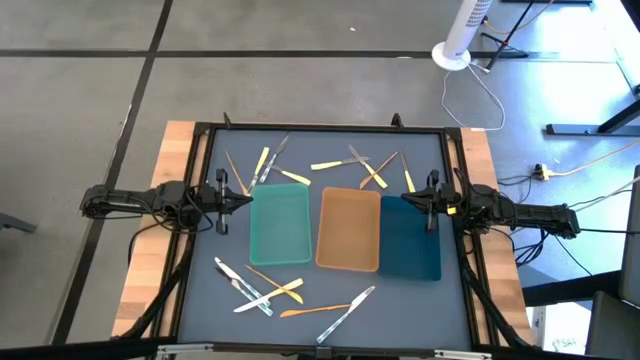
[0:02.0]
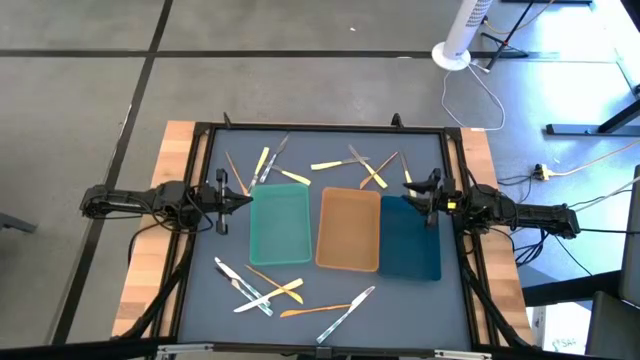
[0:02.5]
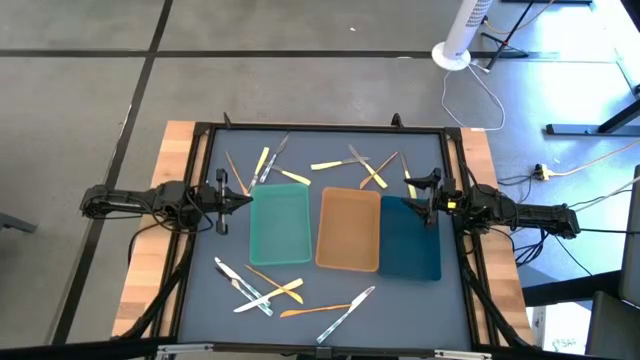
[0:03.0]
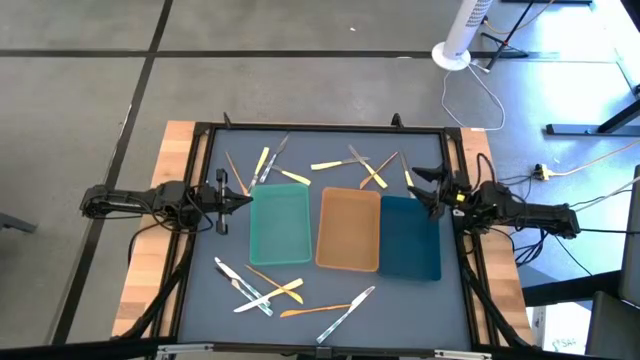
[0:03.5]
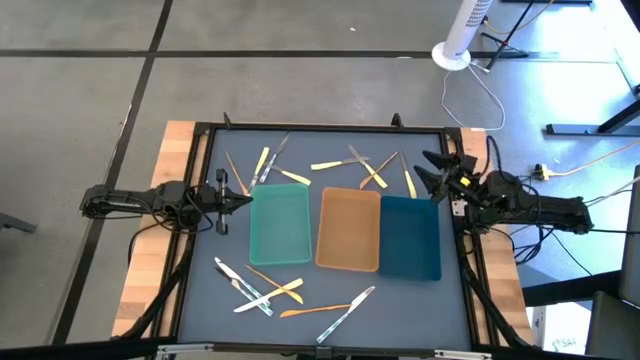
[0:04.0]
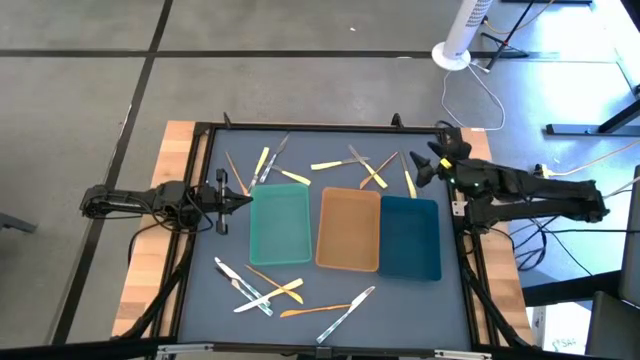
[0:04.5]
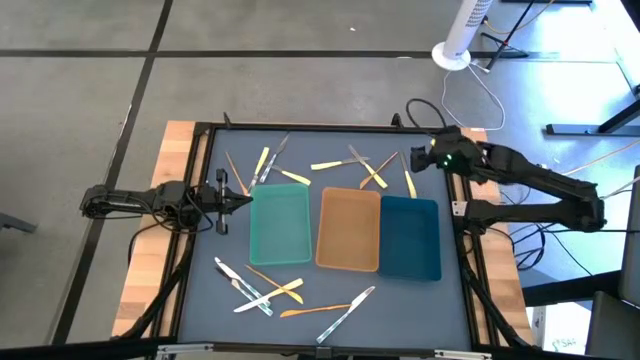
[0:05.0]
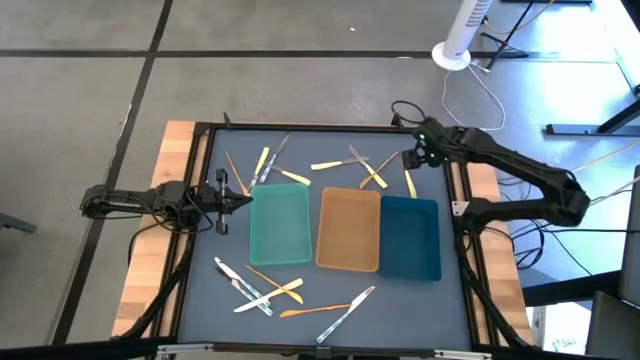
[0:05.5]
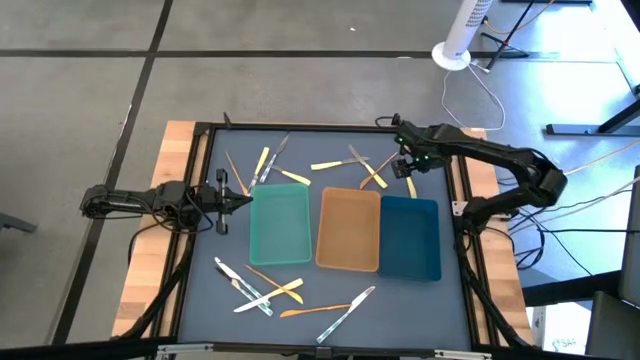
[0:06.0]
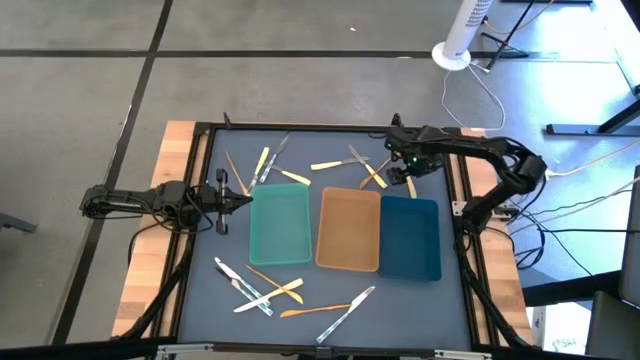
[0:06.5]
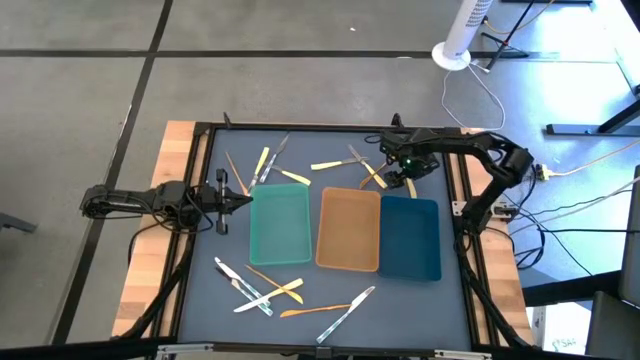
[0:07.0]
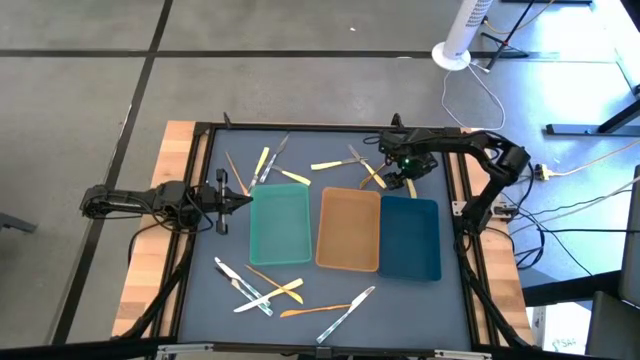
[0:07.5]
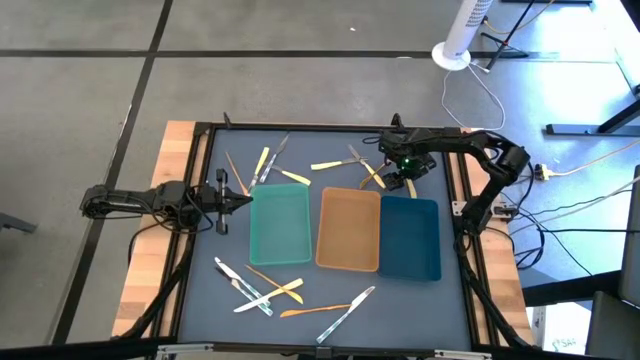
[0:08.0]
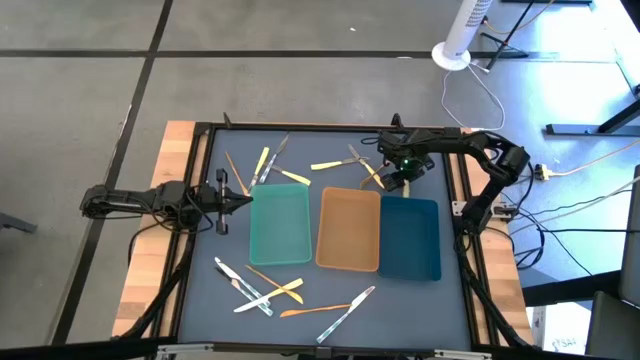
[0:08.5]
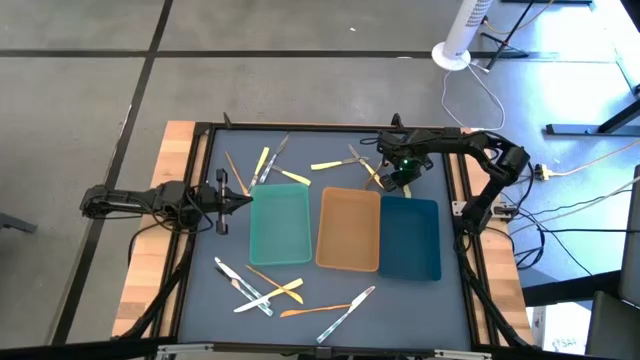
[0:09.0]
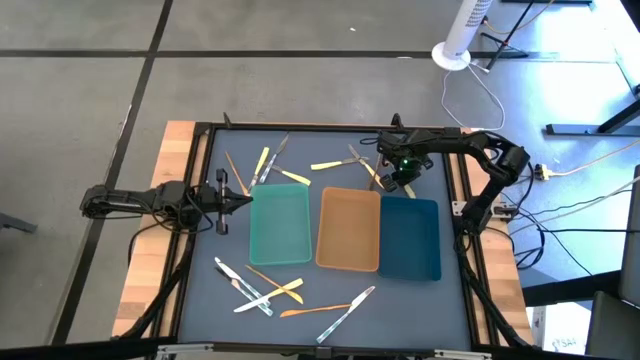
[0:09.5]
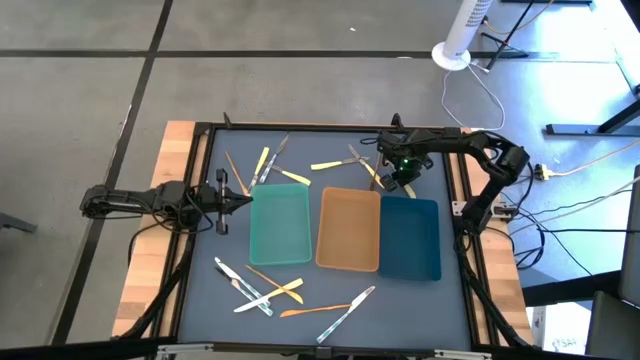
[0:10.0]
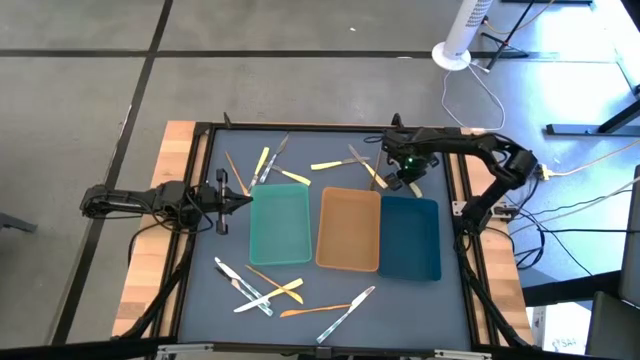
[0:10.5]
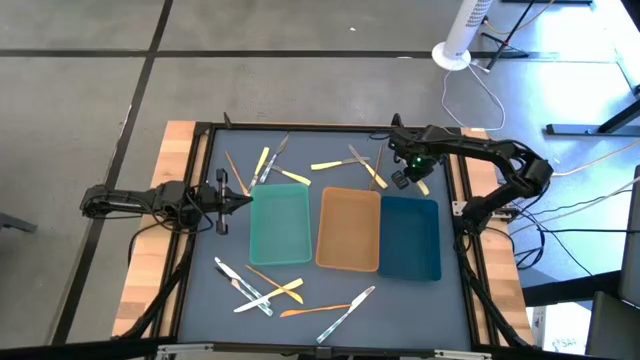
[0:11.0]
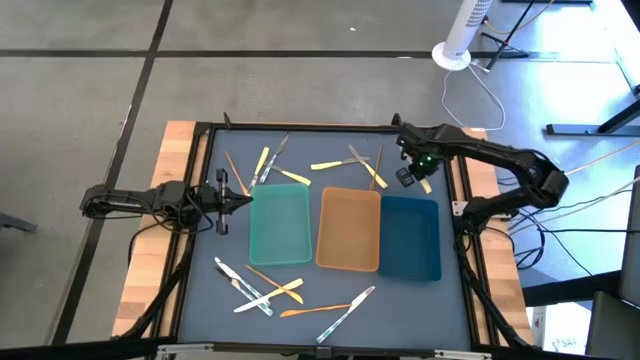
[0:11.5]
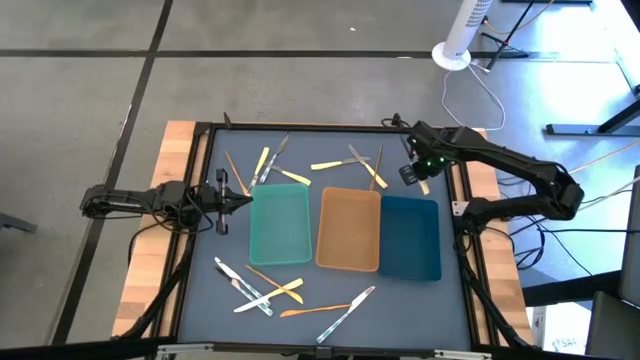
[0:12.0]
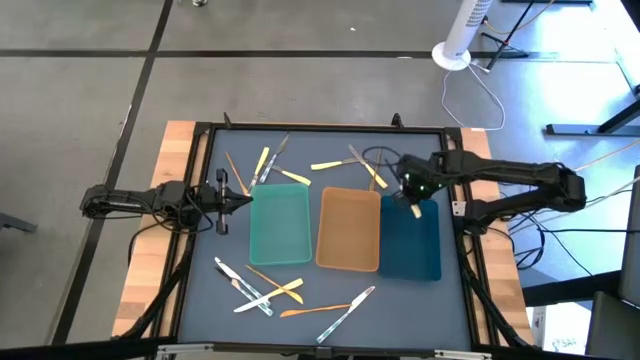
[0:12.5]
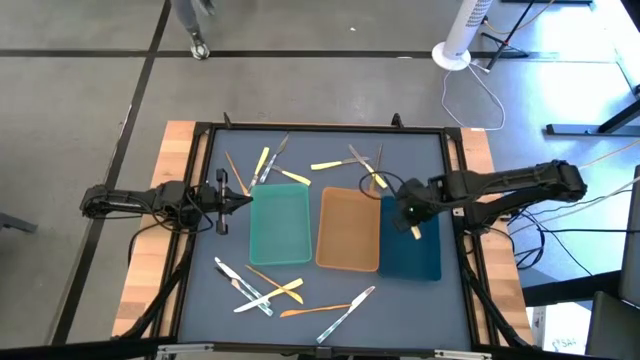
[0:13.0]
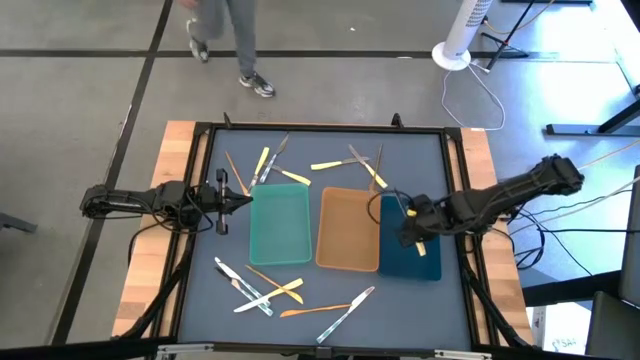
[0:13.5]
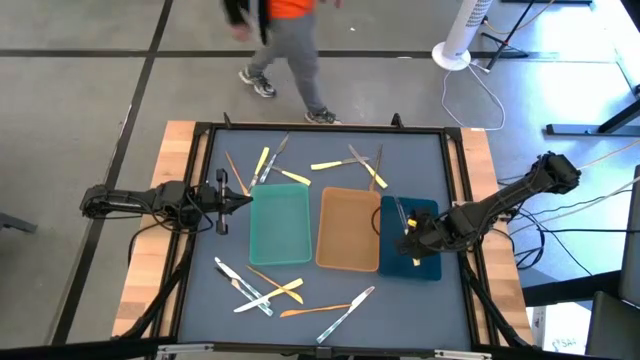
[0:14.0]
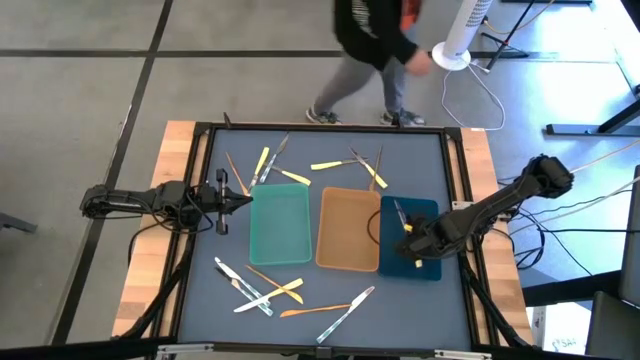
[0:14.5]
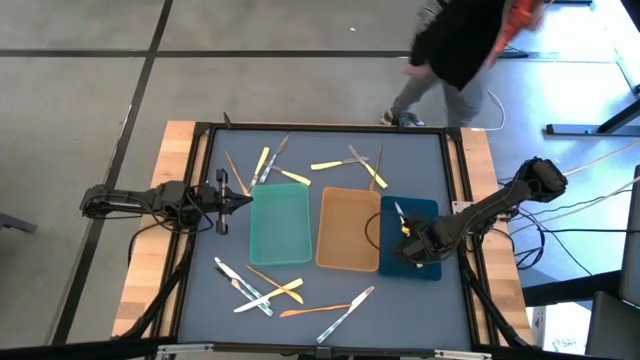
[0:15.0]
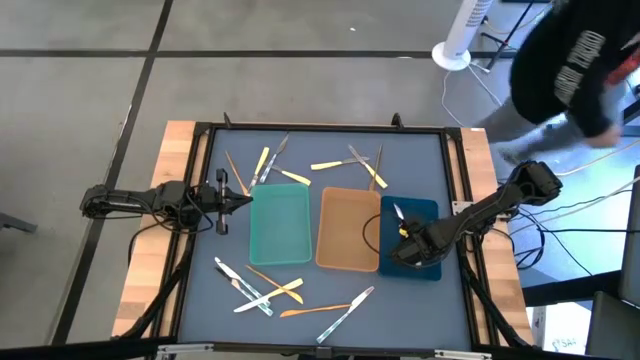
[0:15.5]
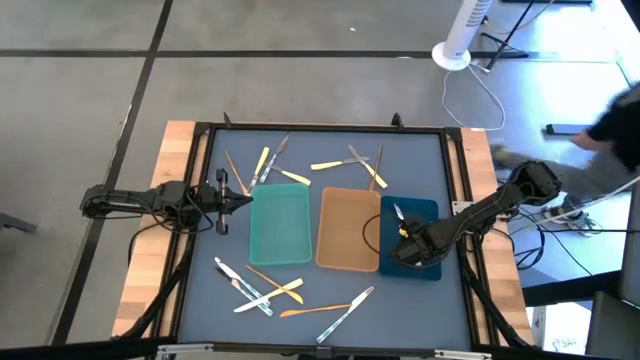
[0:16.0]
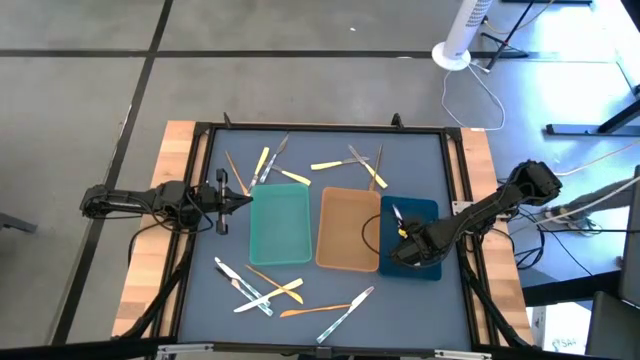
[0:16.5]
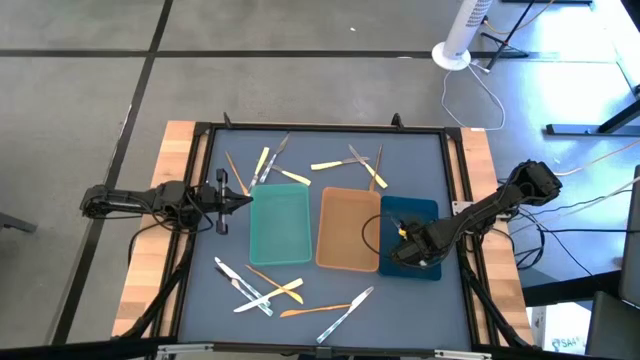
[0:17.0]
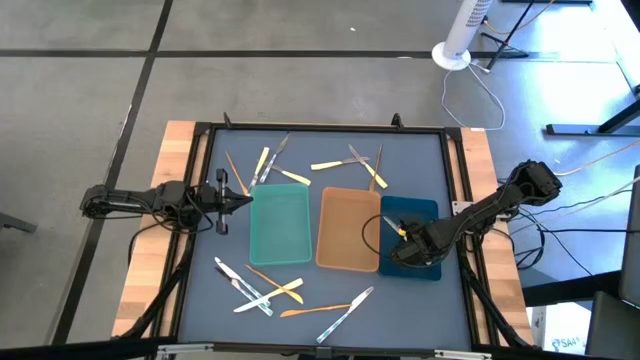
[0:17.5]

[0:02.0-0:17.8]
Task: Sort silverware by color (type)
Put the yellow knife into the blue bin

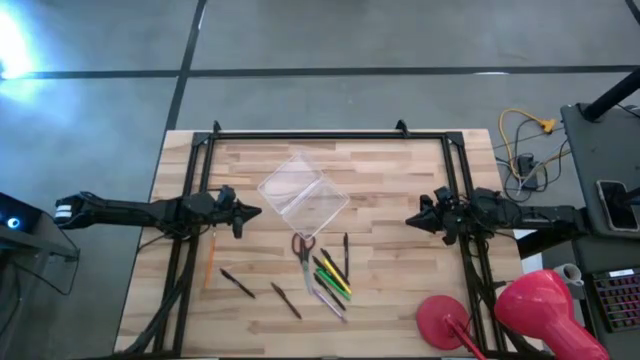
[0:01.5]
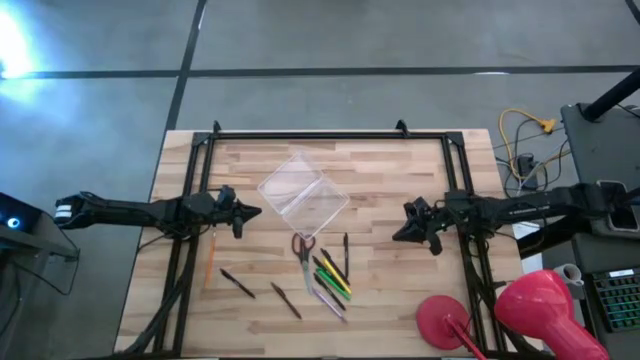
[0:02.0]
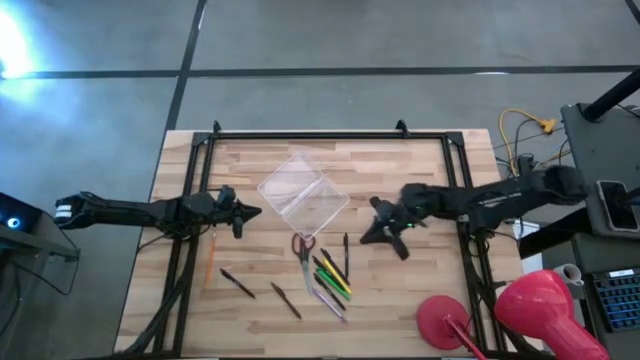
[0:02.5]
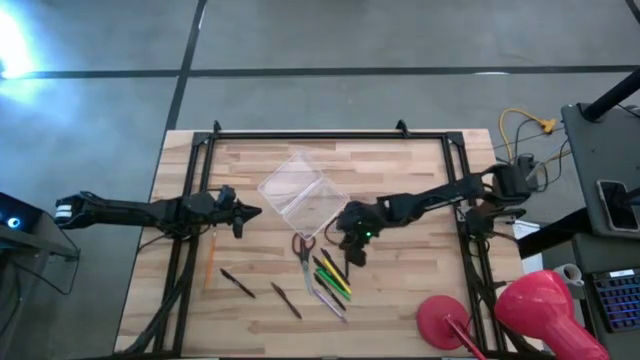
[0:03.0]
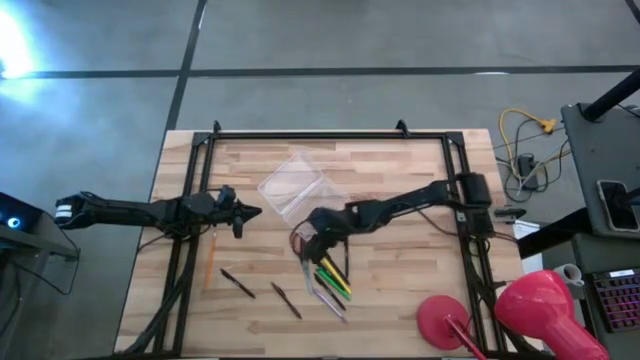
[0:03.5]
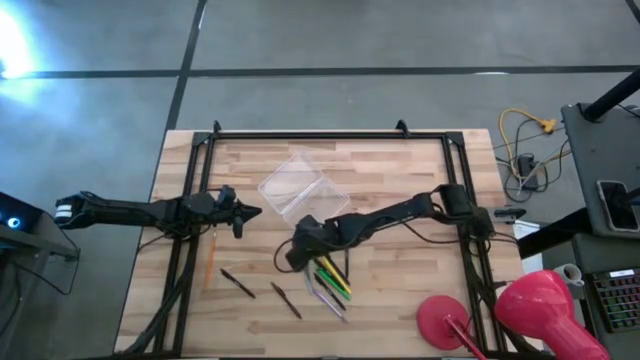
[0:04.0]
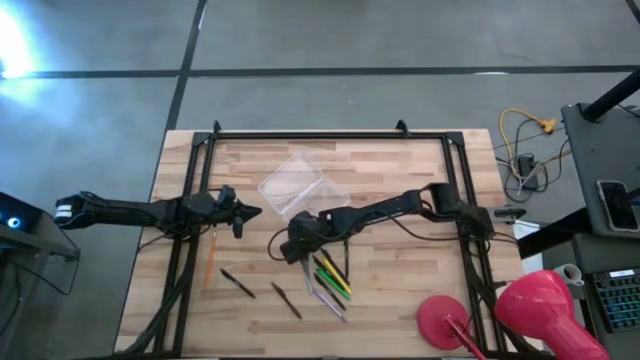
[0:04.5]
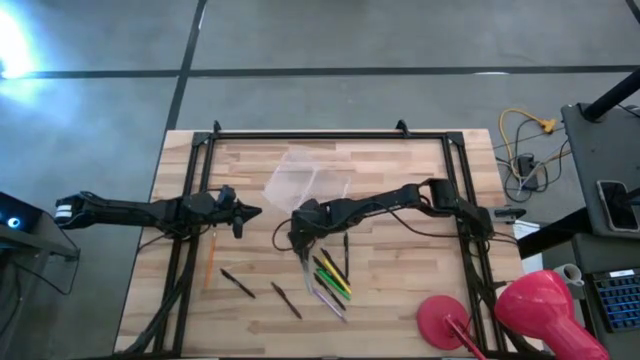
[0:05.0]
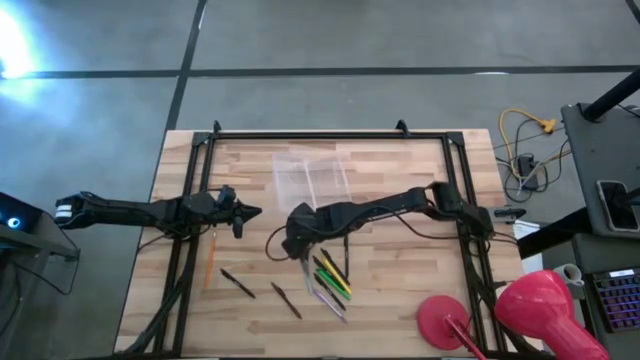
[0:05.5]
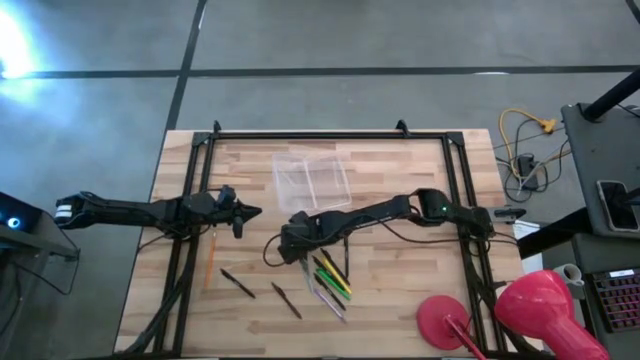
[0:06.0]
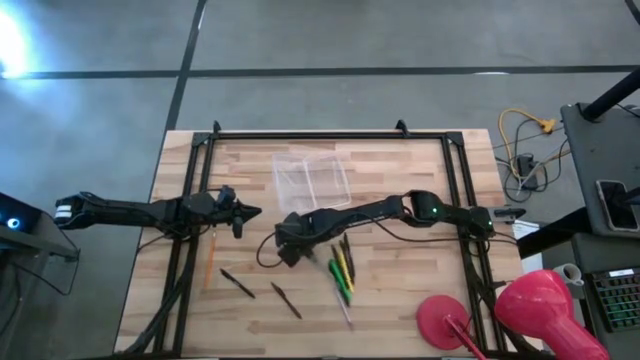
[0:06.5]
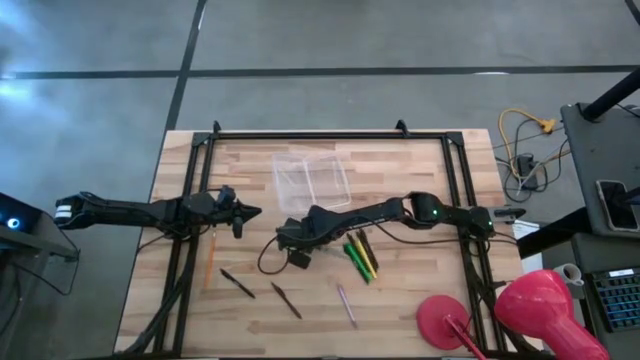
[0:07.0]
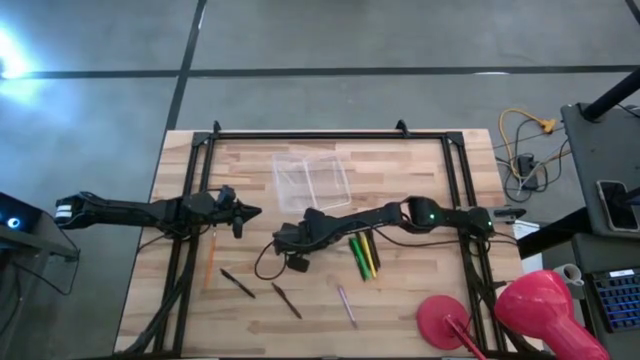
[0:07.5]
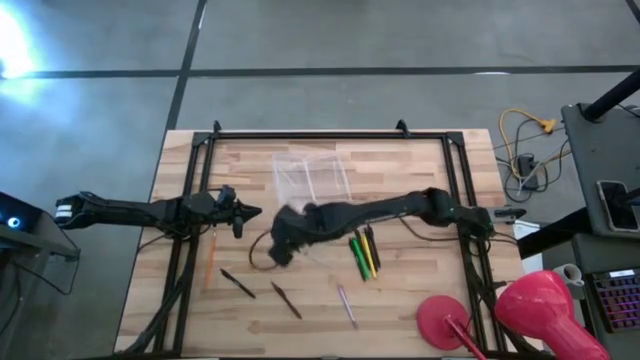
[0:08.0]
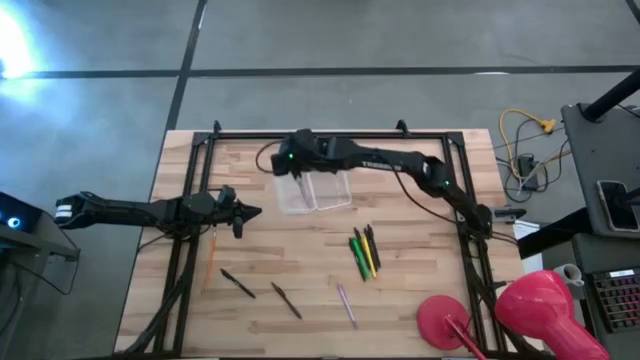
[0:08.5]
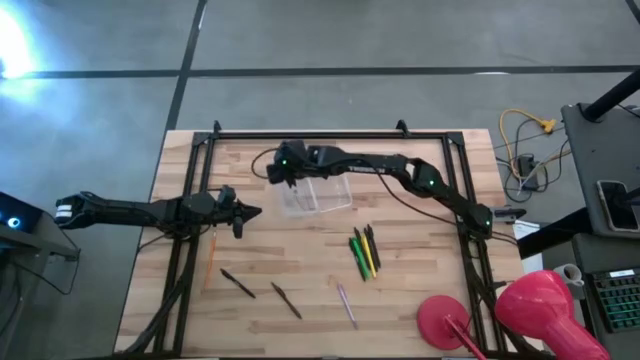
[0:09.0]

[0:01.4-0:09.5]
Task: Pick & place school supplies into a supply box
Put the black scissors into the transparent supply box
